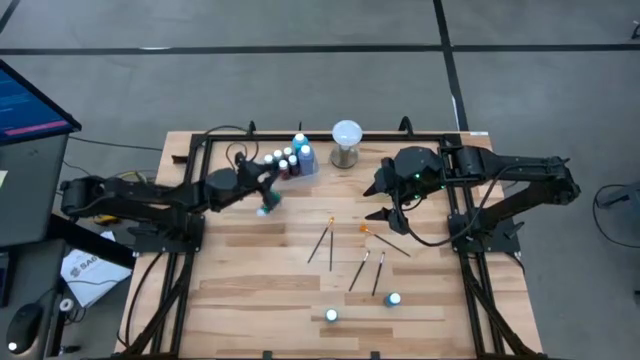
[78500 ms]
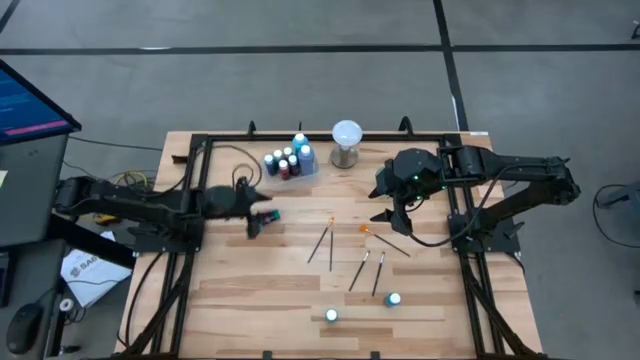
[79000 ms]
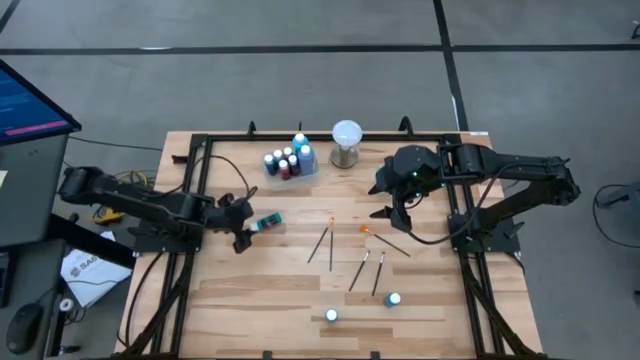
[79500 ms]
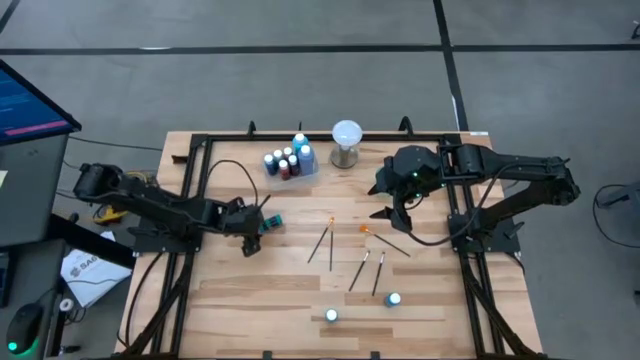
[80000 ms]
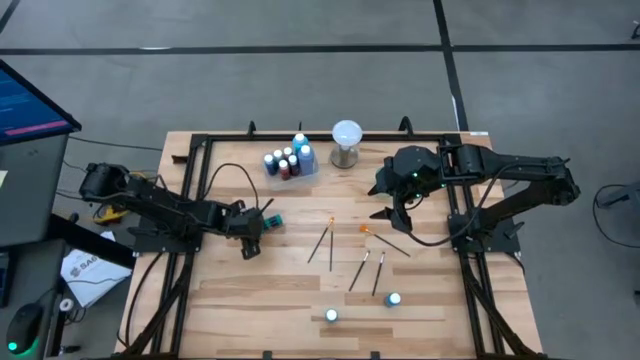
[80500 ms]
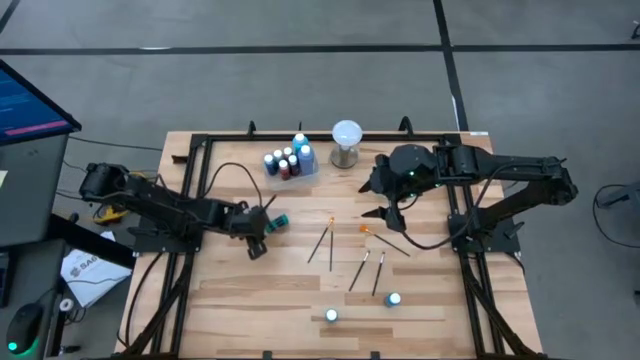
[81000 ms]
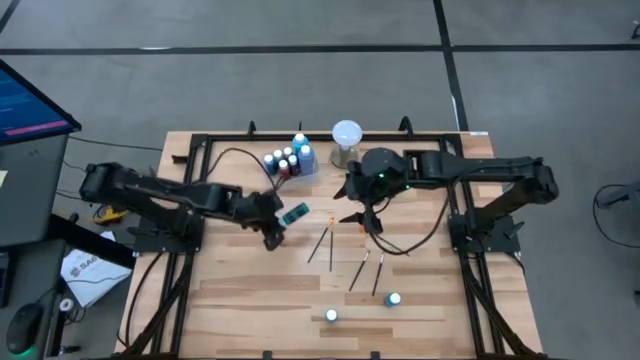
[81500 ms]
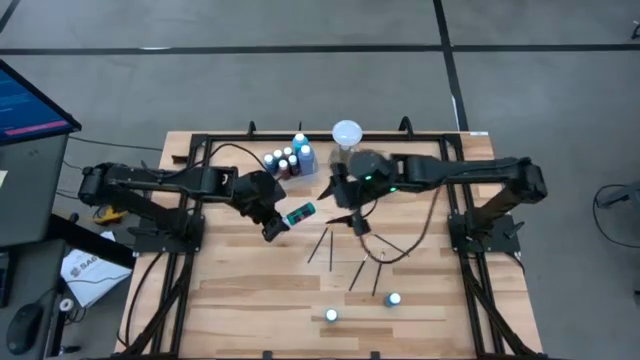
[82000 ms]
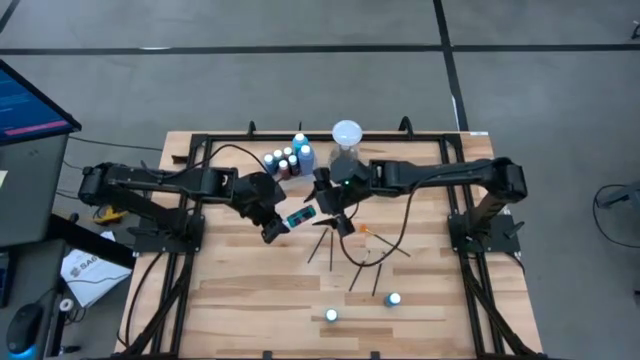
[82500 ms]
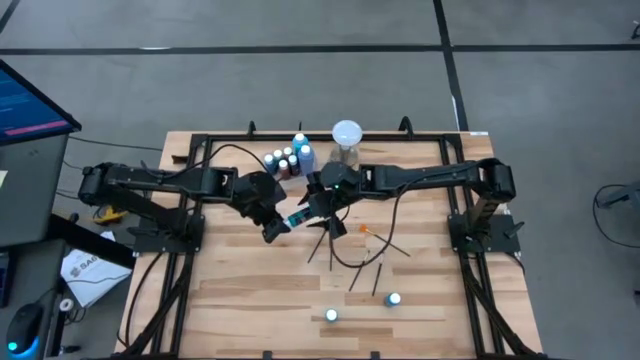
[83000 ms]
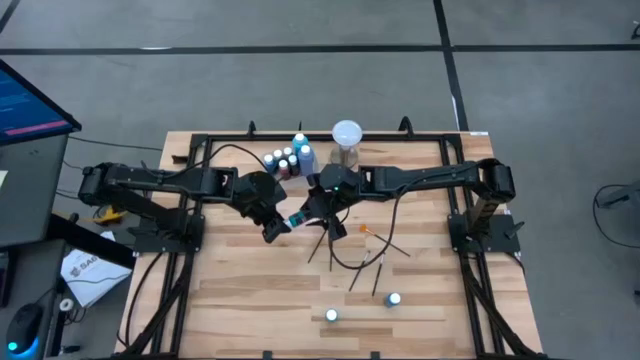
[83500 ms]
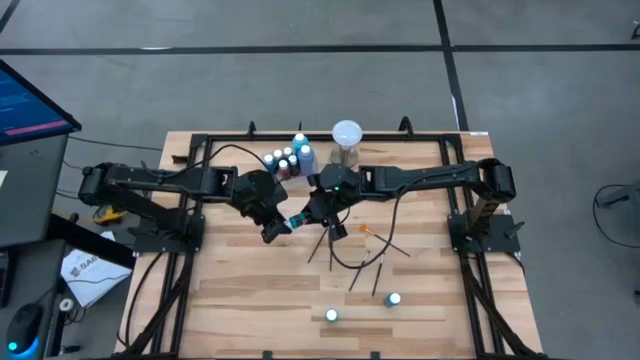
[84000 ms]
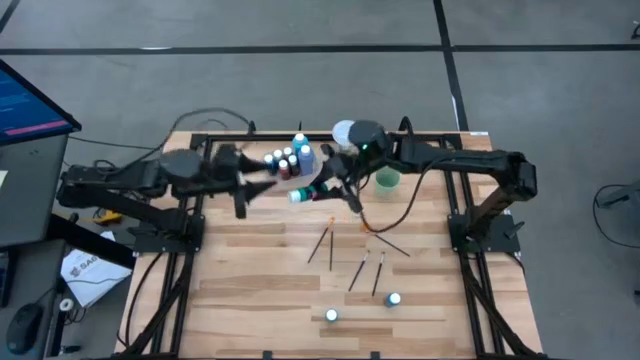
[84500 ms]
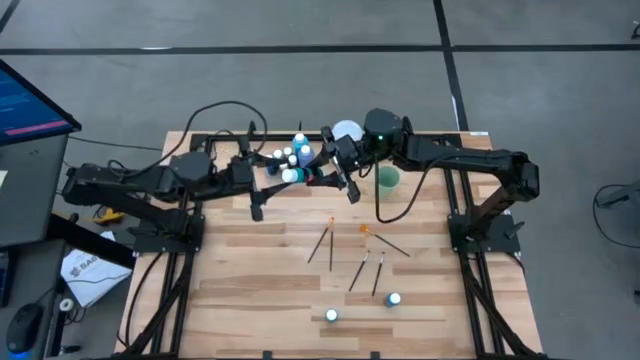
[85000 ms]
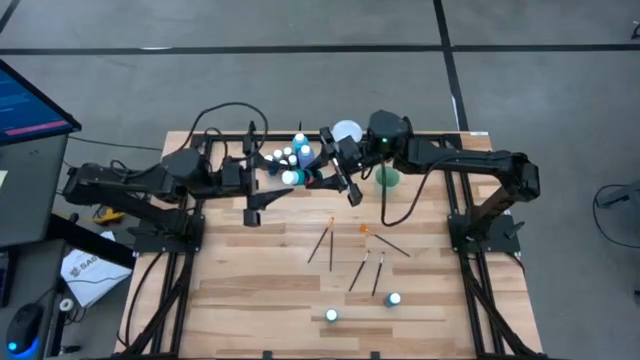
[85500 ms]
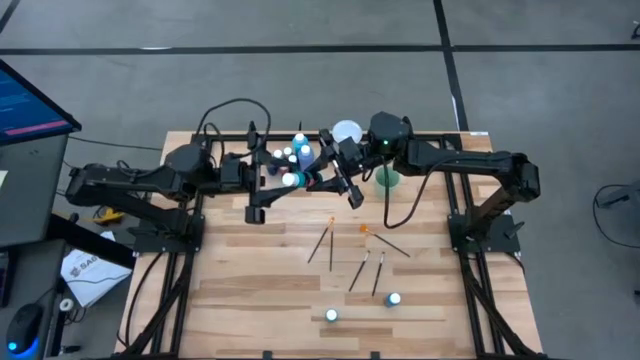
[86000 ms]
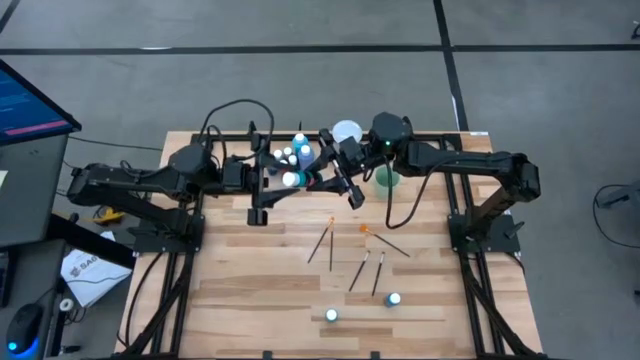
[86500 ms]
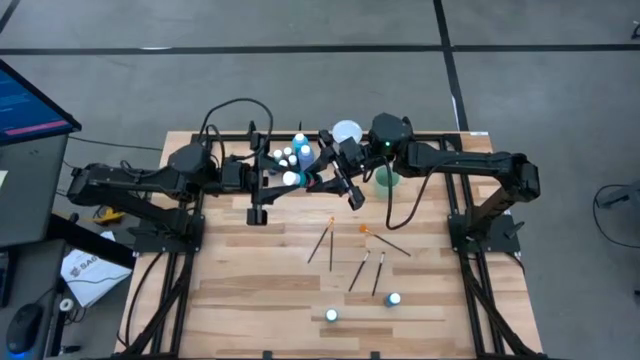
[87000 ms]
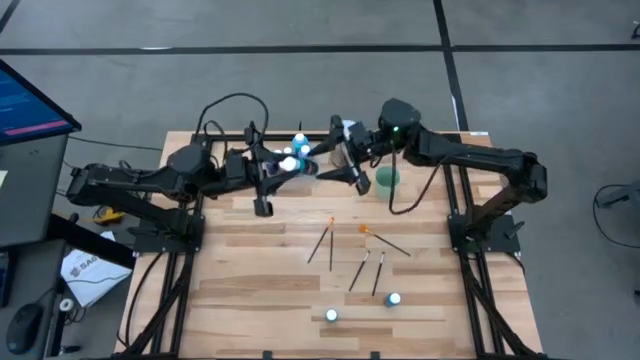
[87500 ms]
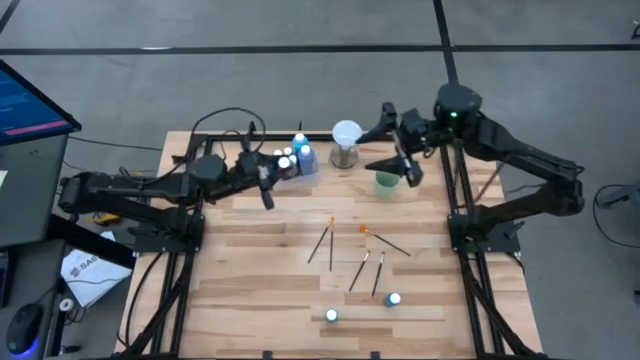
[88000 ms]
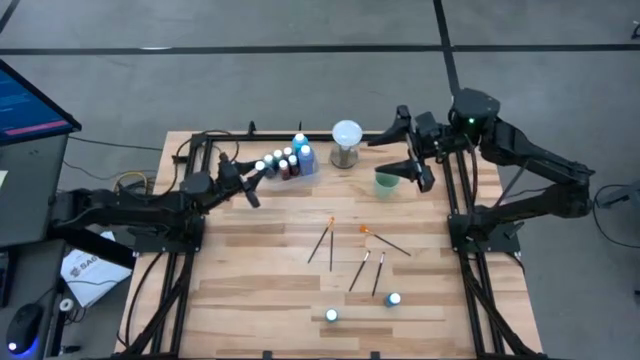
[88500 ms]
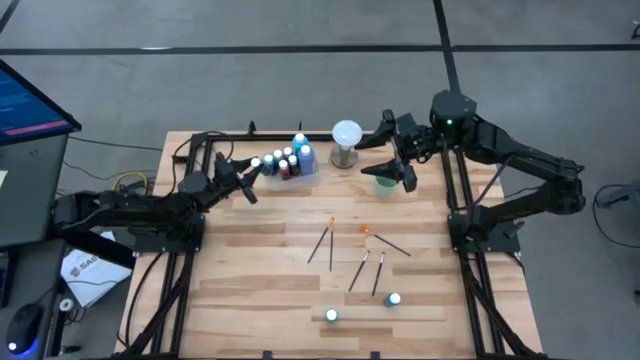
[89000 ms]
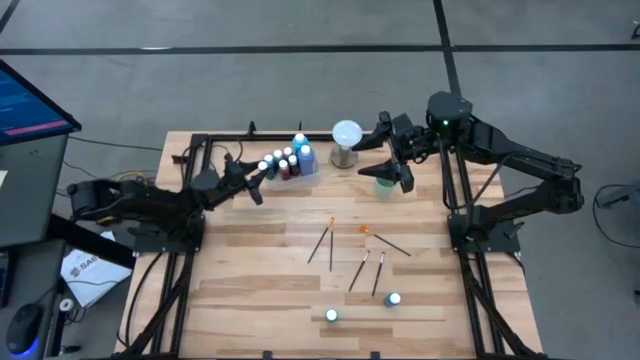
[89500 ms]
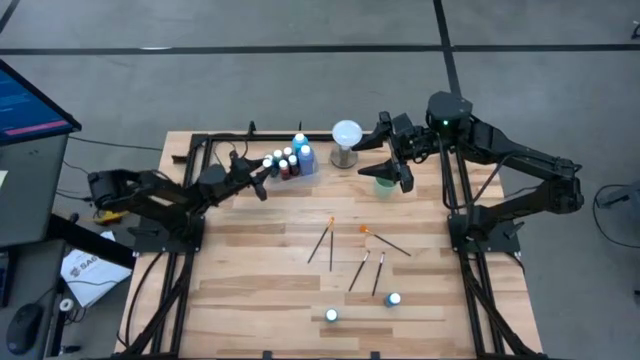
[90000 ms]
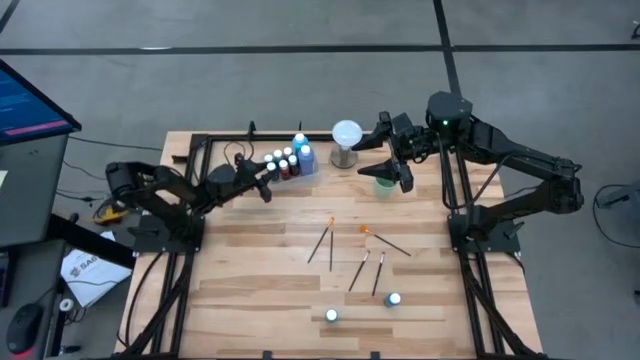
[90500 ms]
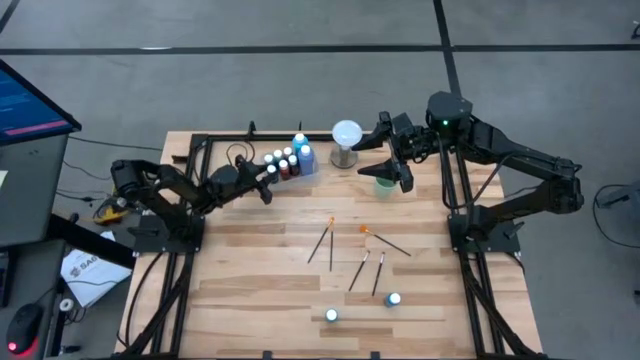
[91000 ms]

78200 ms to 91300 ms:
Task: Pick & Place Paint Supplies
Put the small dark green paint bottle into the transparent bin

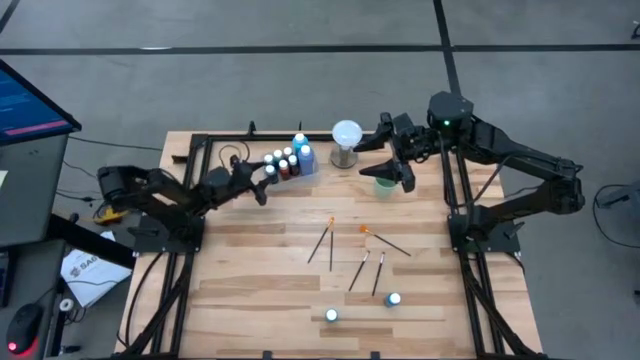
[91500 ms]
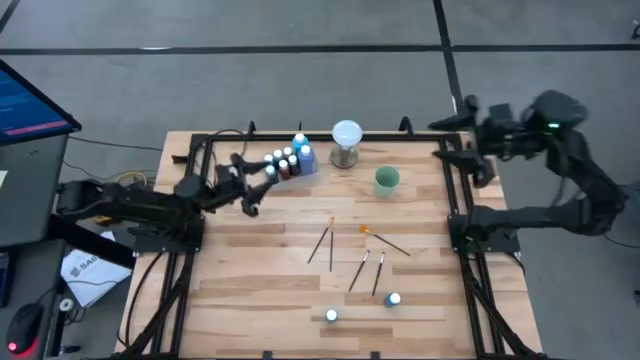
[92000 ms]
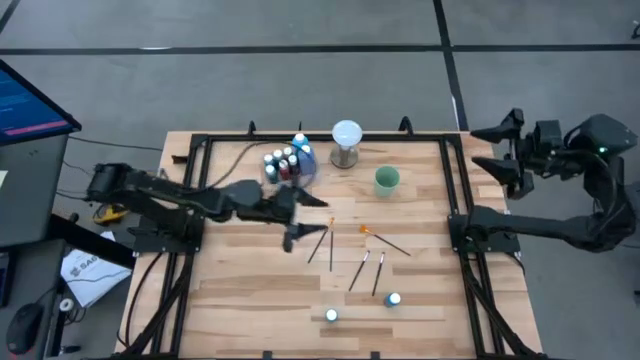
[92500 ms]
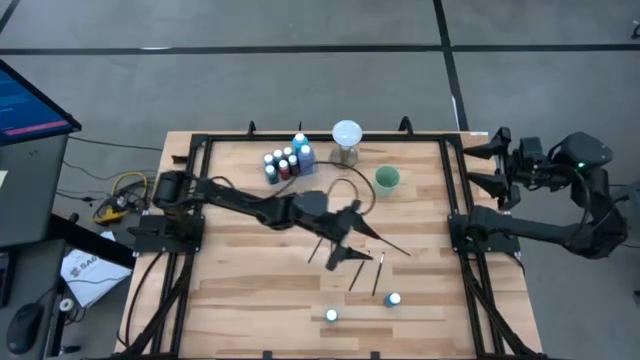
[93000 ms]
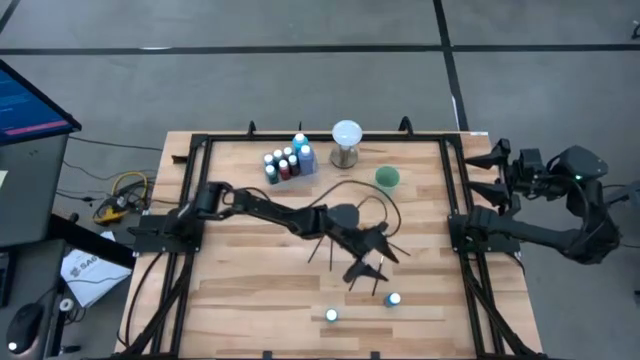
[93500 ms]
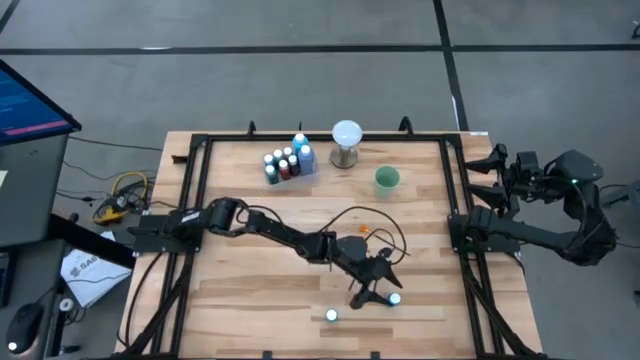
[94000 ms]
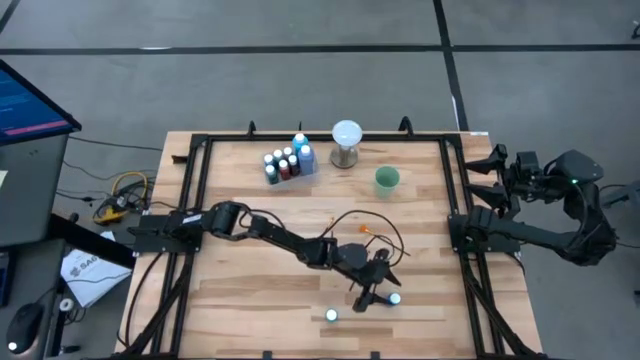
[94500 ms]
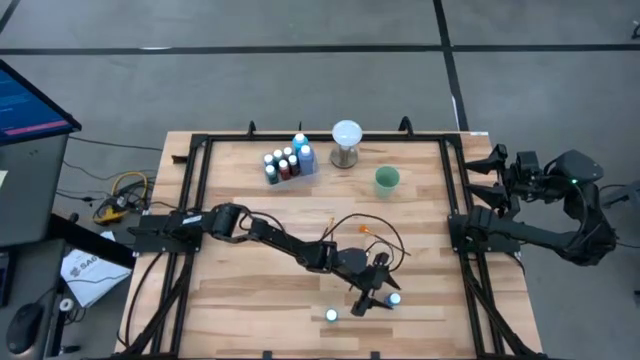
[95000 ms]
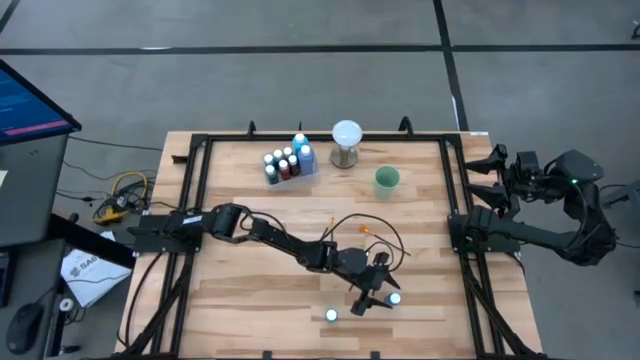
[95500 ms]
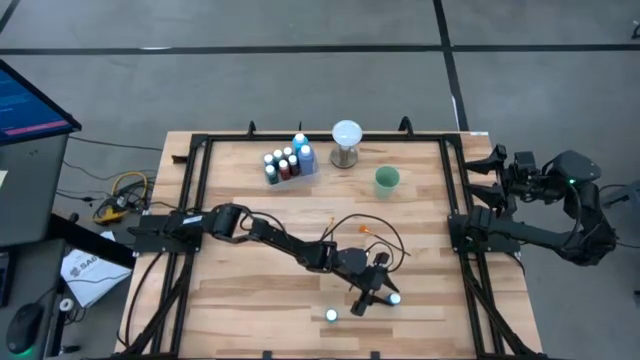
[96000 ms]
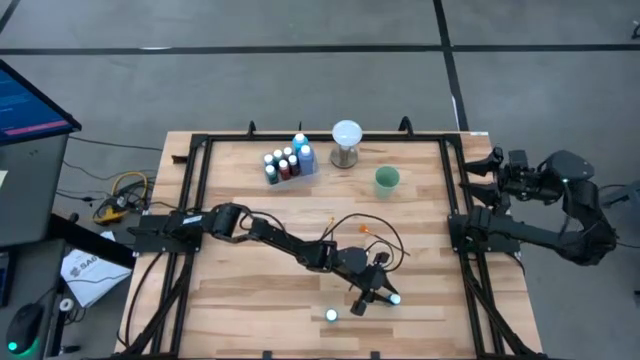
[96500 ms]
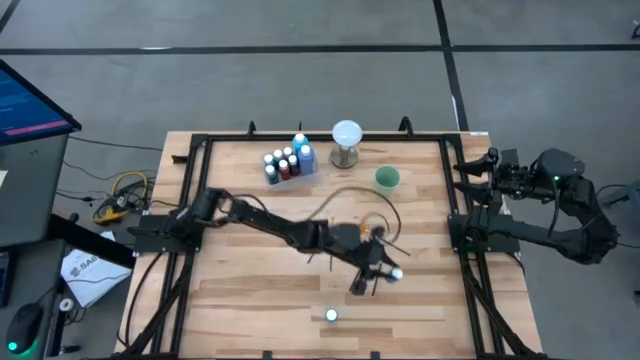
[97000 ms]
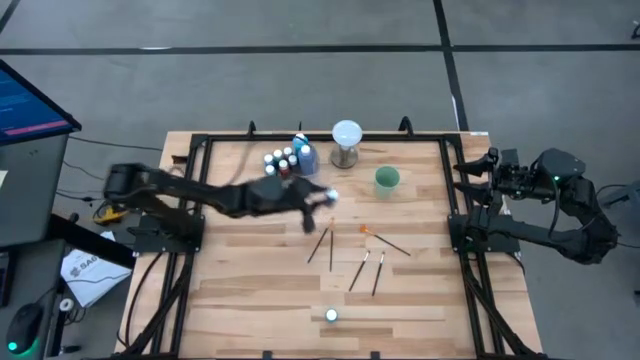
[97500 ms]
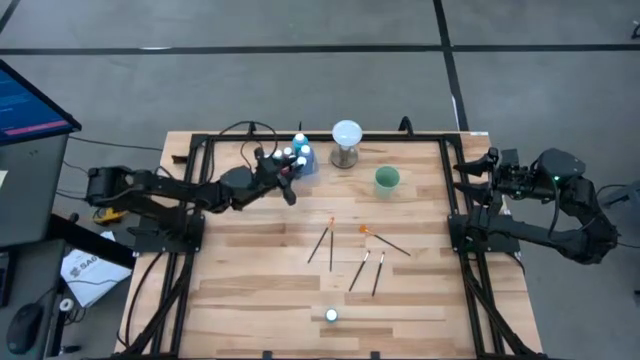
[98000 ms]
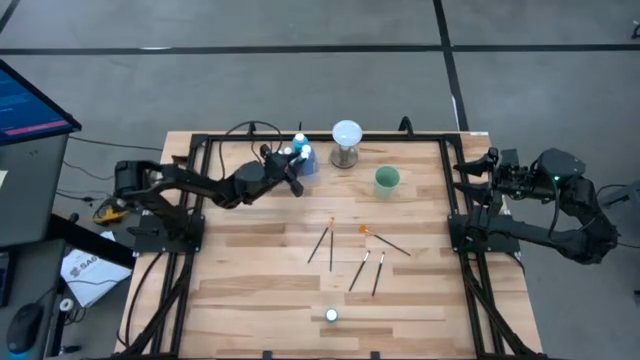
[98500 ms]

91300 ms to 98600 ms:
Put the small blue paint bottle into the transparent bin
